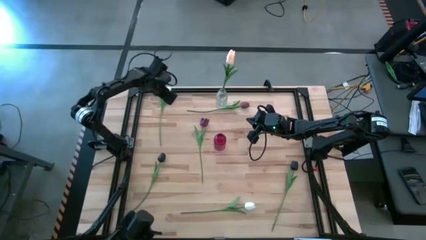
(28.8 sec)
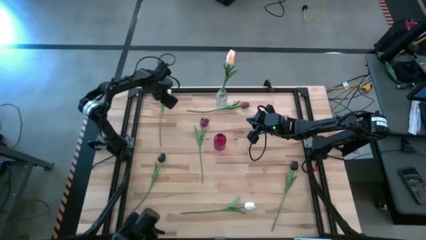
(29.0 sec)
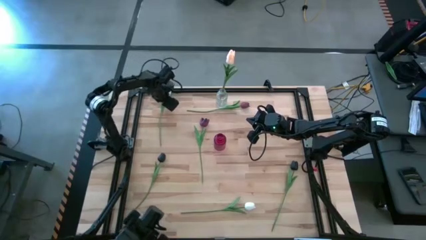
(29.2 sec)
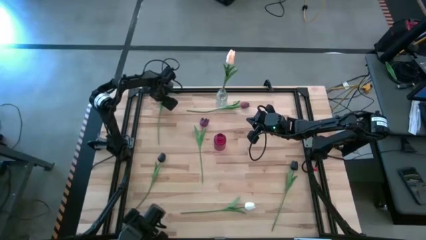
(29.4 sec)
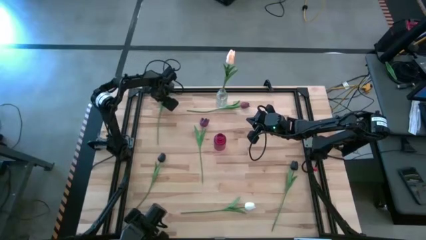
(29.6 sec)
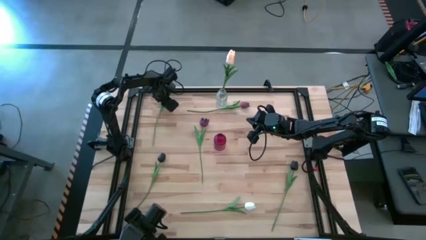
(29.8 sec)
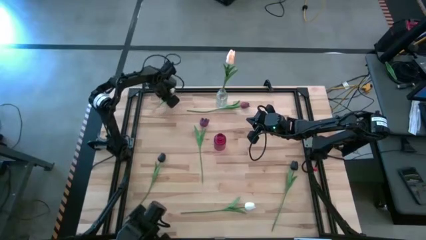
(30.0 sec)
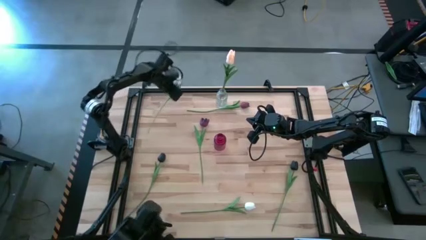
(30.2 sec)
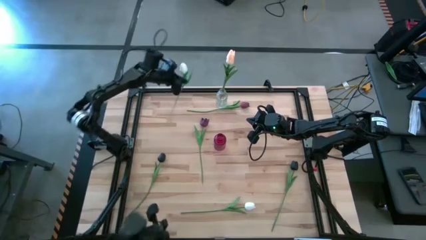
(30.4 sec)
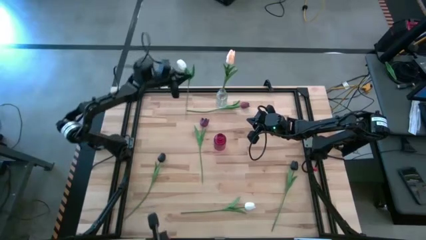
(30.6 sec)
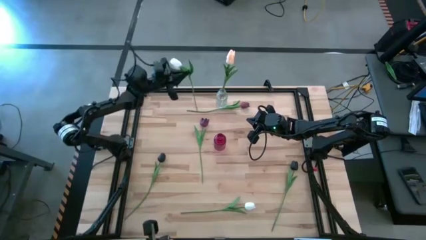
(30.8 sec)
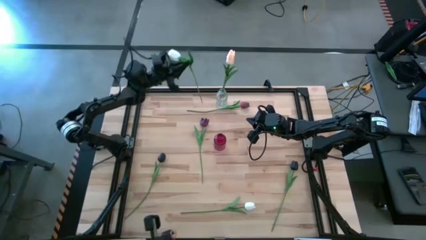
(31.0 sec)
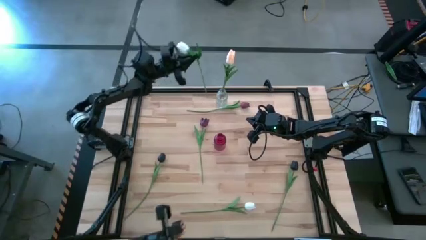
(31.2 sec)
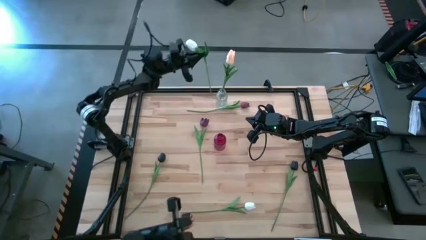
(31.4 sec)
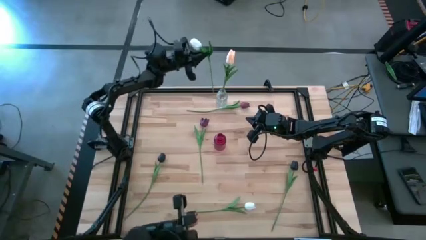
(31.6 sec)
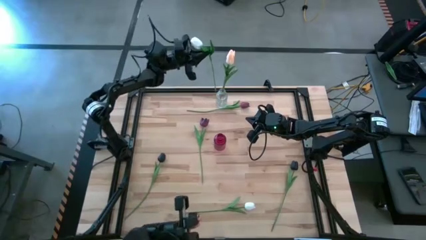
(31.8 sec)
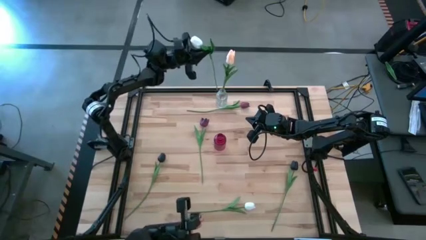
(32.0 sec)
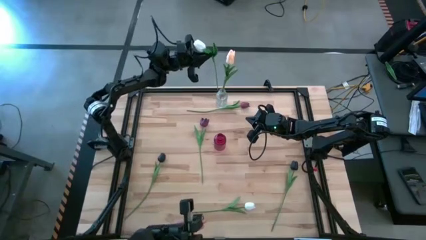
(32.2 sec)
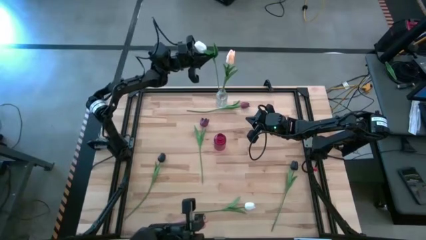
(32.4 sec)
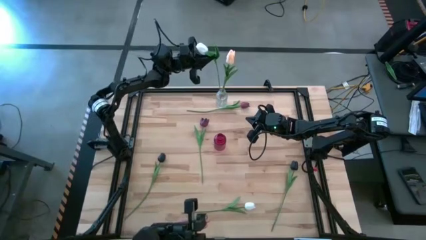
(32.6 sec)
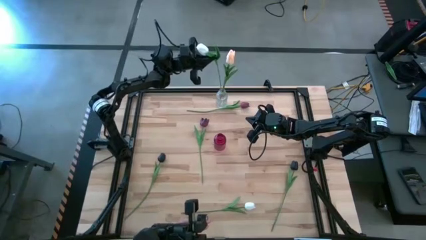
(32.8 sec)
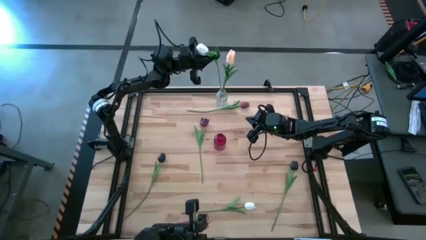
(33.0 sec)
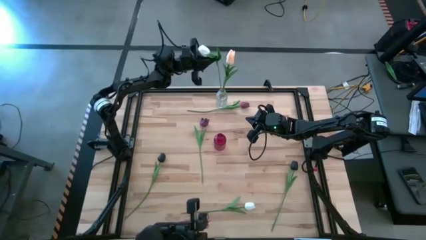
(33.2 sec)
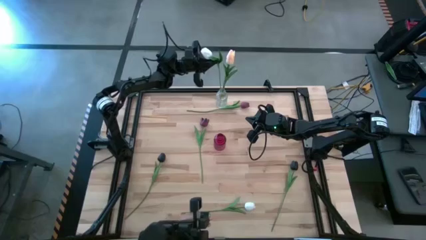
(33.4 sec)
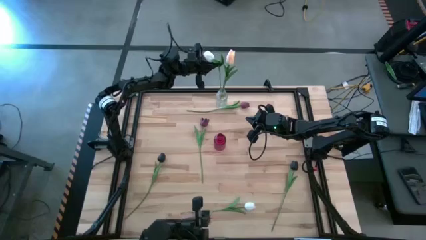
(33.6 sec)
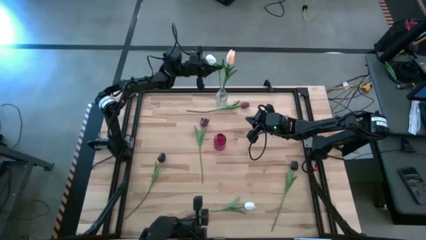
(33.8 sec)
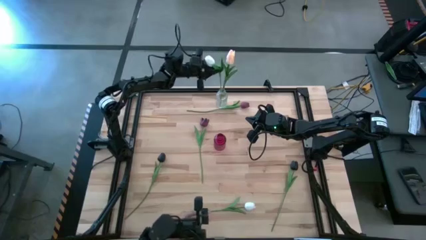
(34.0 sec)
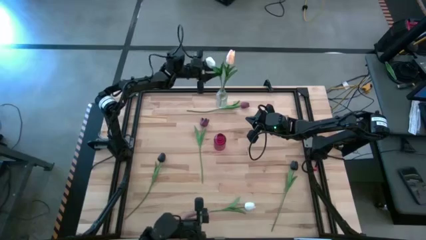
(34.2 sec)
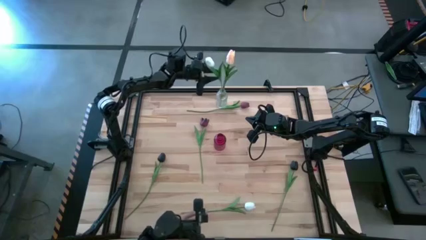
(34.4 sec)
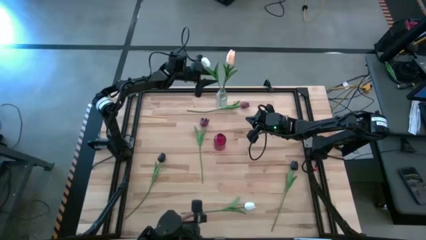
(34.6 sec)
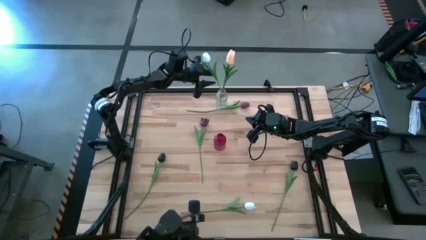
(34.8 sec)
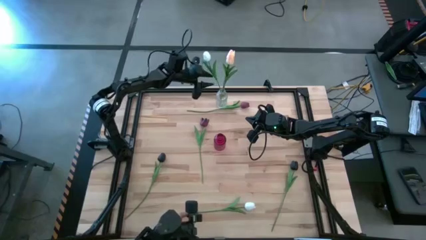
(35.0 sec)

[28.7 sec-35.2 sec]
Task: Sort flowers into vase by color
Put the top white flower into the transparent vase

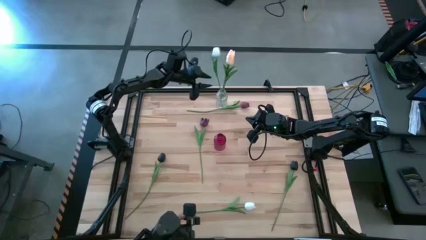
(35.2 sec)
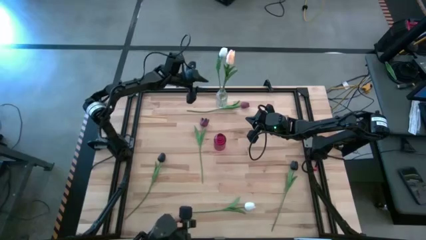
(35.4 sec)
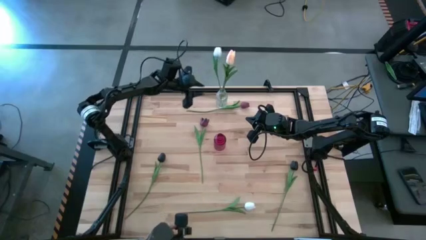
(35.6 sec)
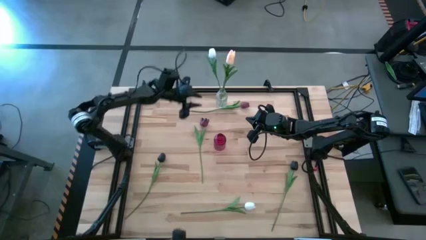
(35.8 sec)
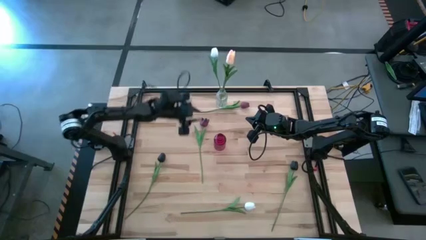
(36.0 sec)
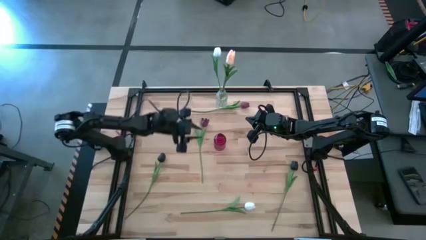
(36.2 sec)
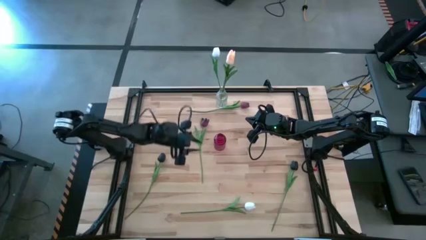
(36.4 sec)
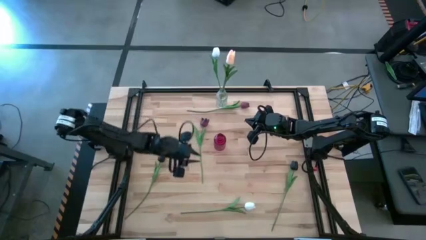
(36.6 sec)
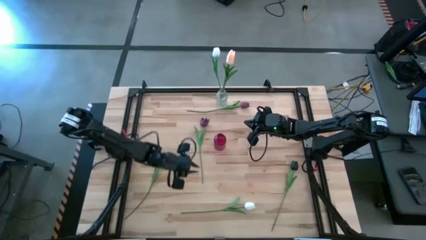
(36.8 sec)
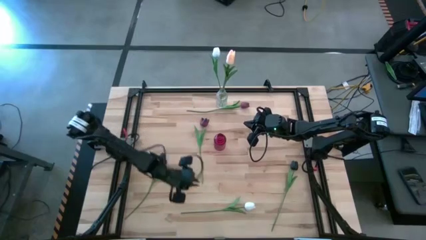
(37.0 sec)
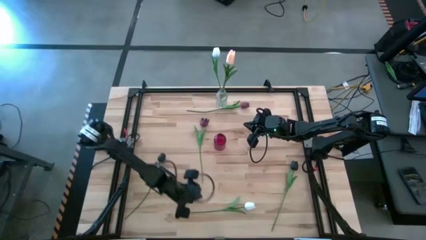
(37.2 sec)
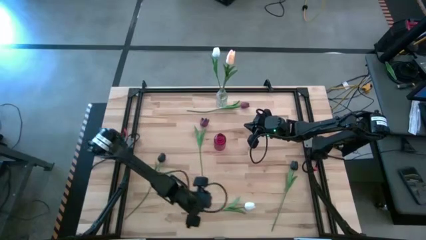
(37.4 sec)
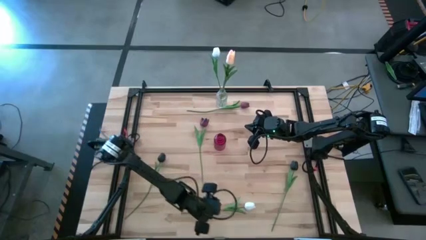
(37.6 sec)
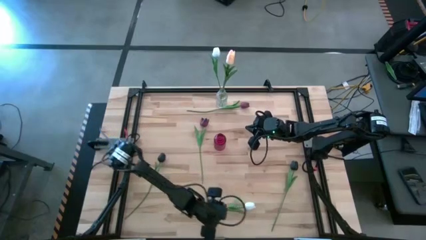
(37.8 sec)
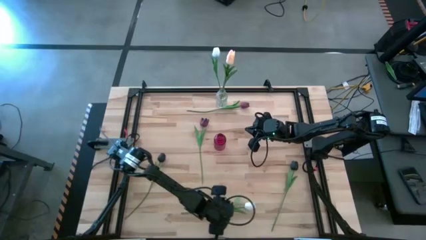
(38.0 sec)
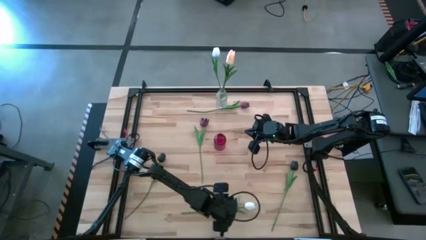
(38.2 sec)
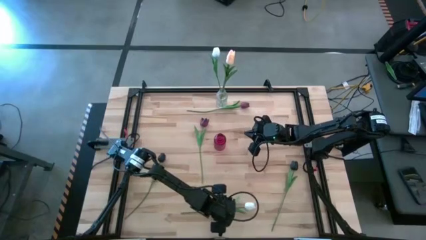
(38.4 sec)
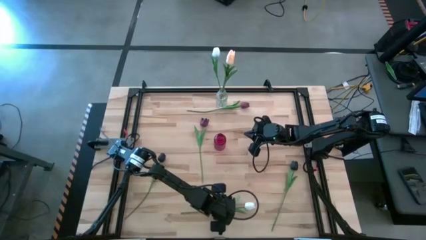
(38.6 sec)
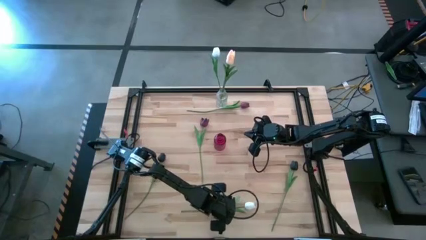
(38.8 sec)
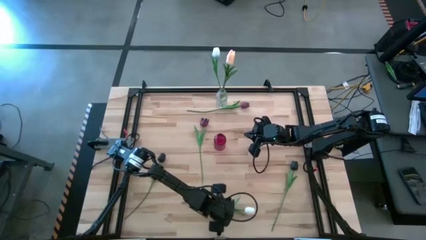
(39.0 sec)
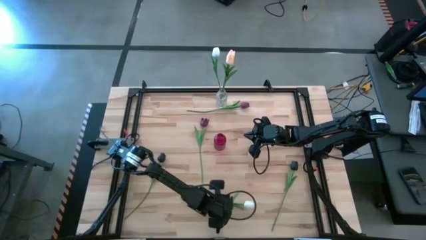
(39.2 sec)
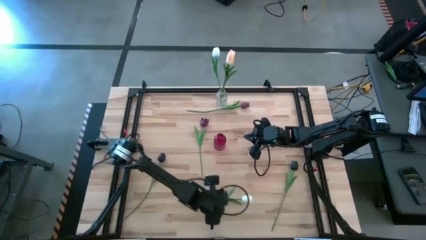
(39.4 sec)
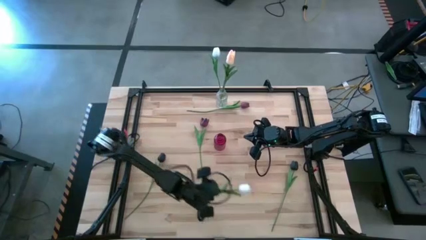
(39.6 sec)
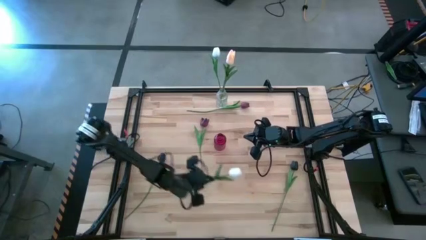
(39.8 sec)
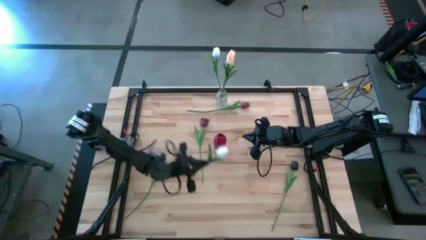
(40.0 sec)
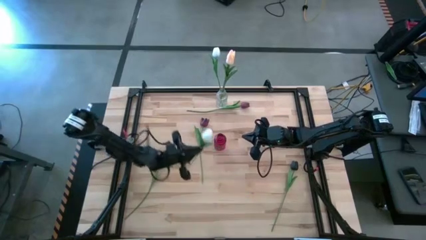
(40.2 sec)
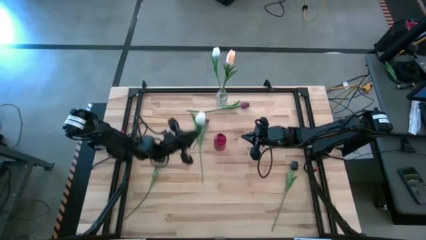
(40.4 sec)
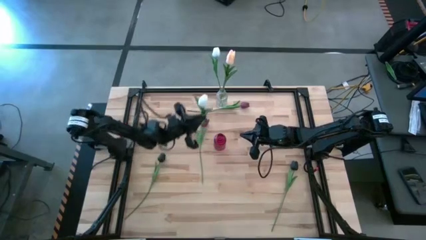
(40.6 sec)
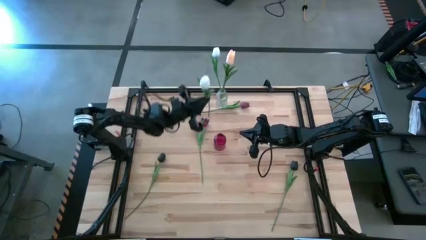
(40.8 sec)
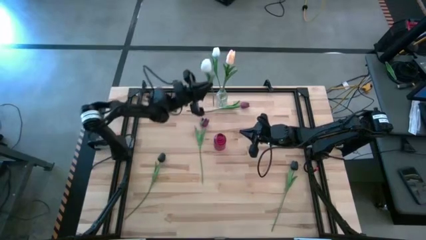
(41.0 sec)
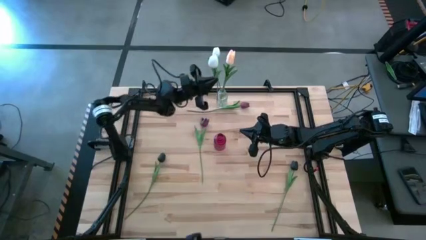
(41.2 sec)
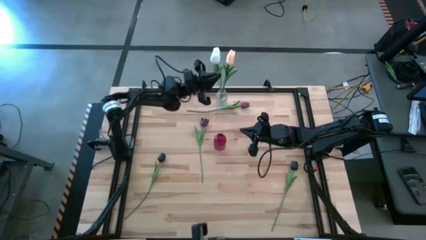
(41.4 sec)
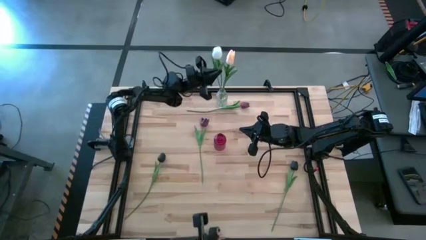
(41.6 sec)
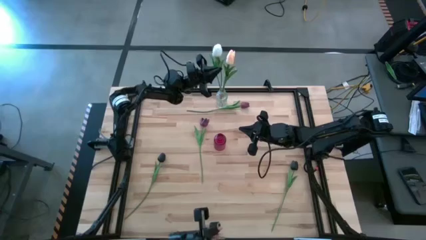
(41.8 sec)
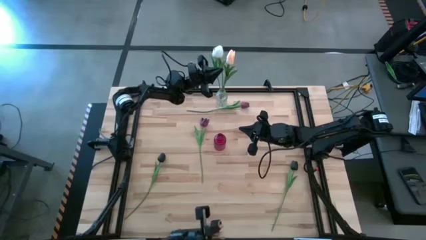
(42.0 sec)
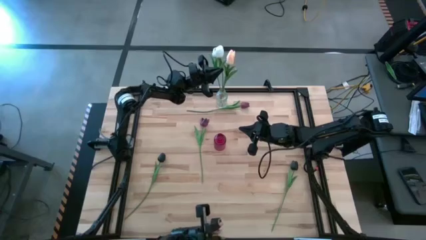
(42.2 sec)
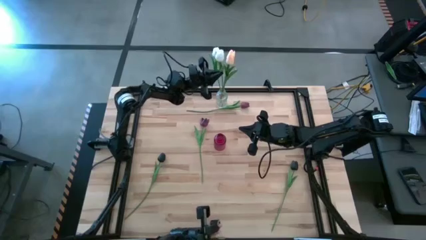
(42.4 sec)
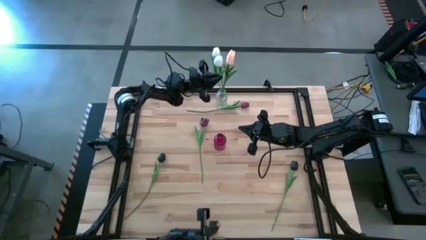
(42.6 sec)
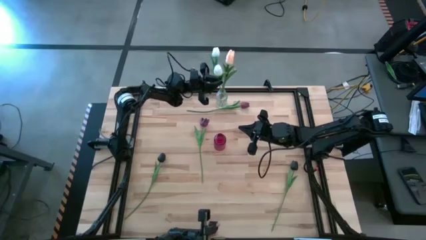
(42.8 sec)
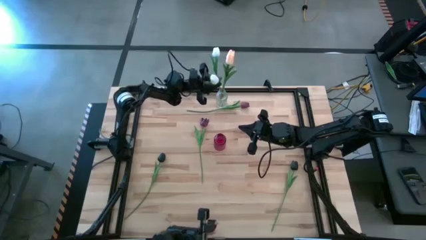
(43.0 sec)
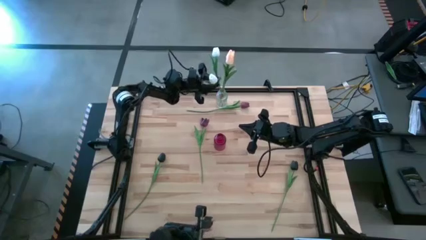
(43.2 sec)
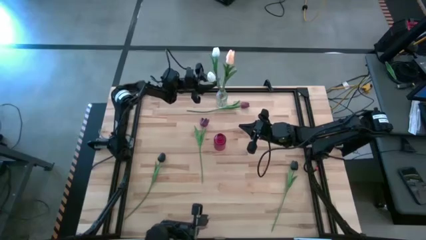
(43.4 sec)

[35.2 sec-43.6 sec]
Put the white flower into the transparent vase
